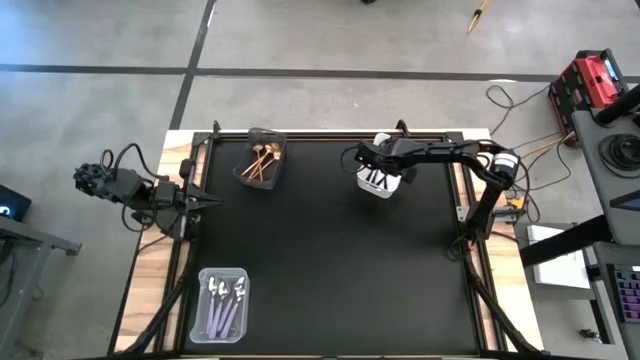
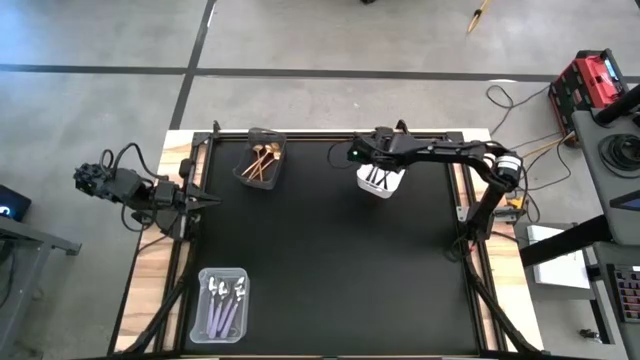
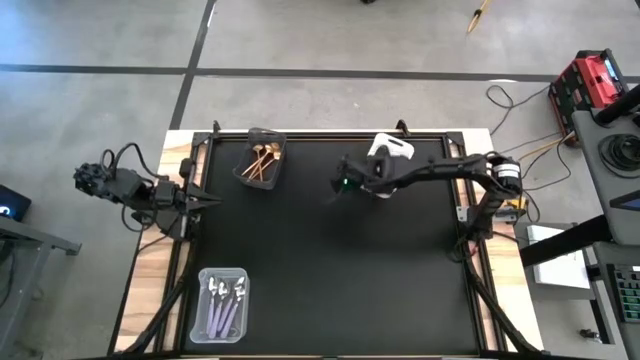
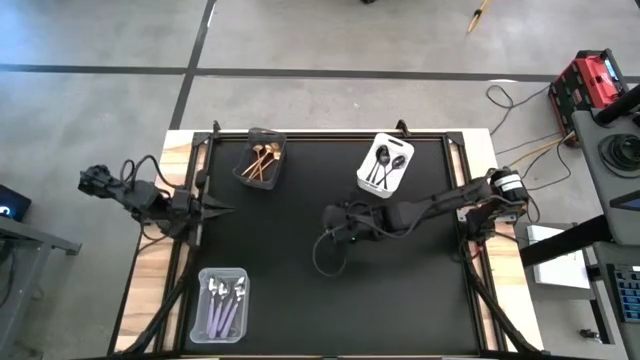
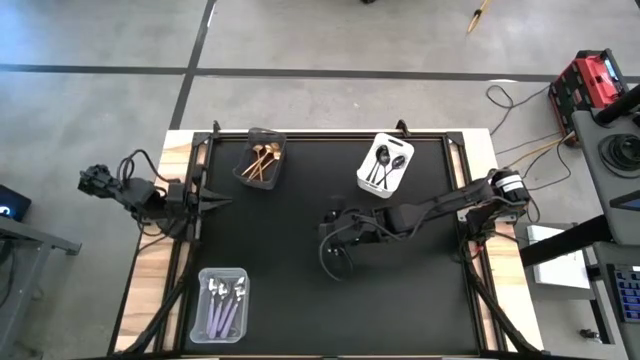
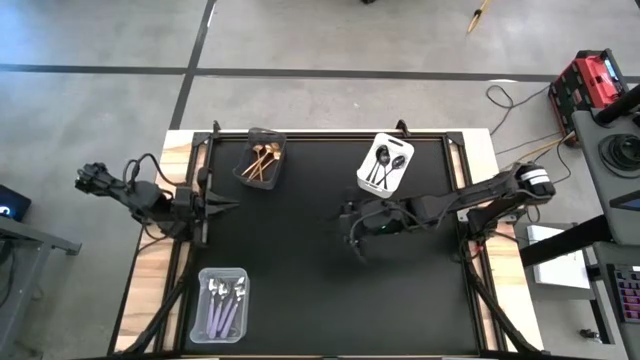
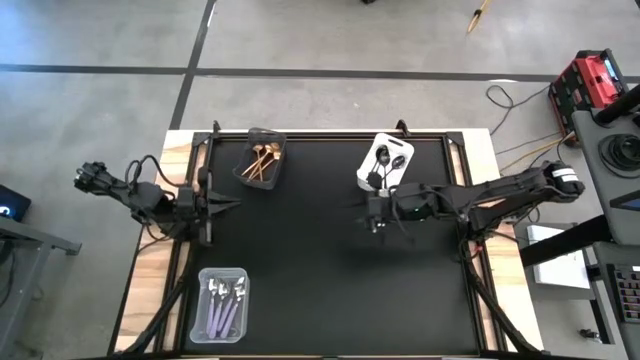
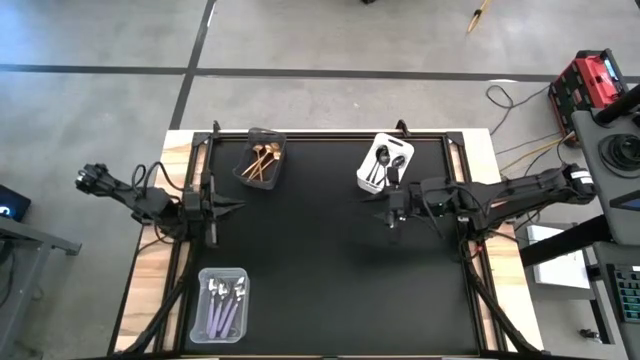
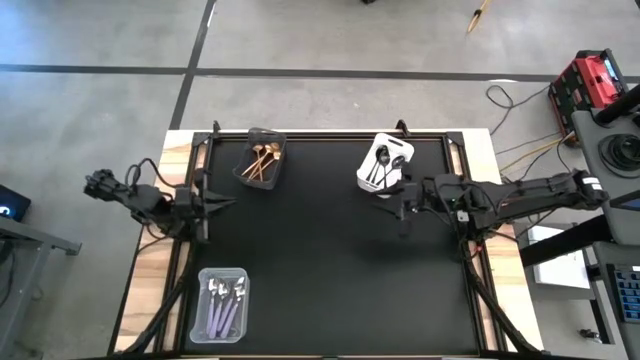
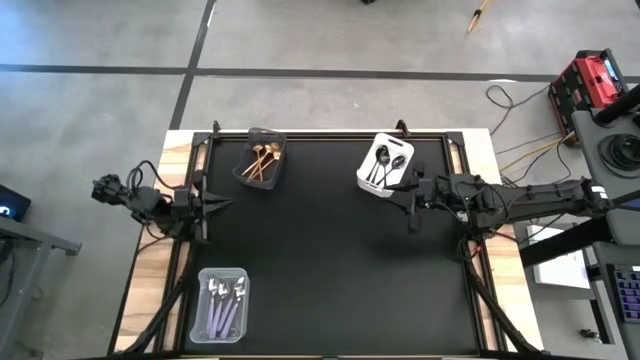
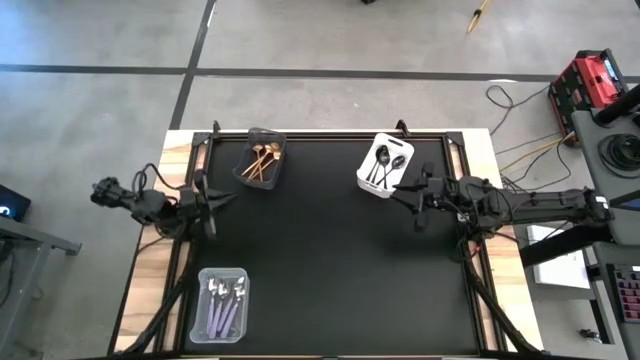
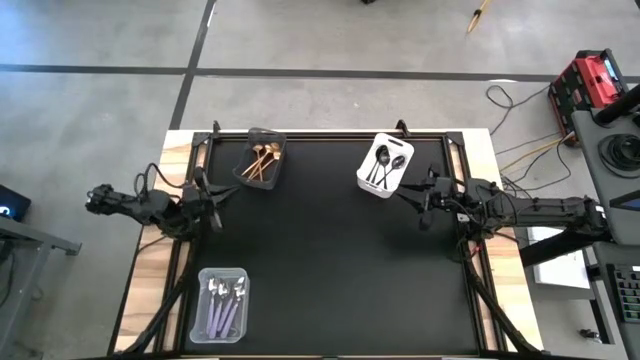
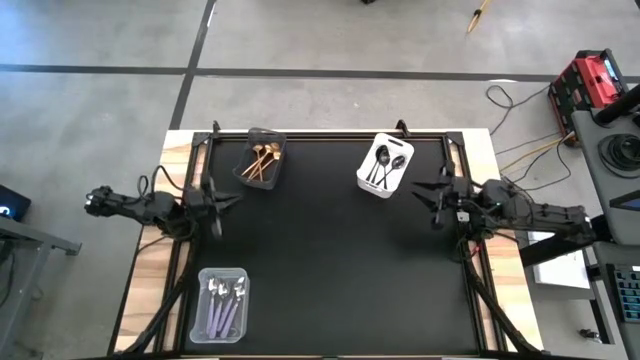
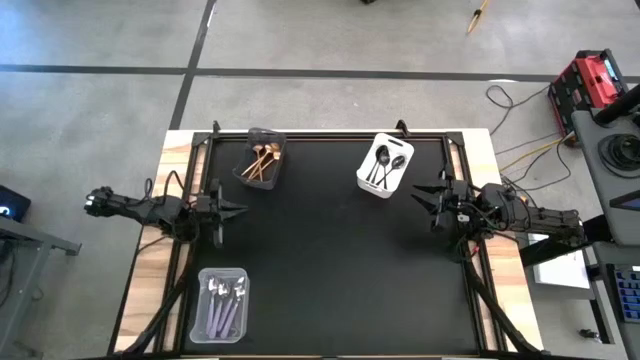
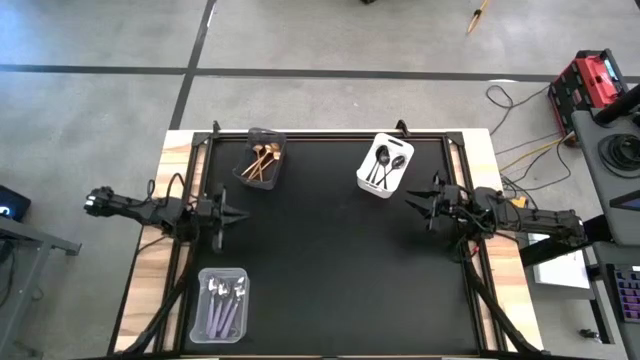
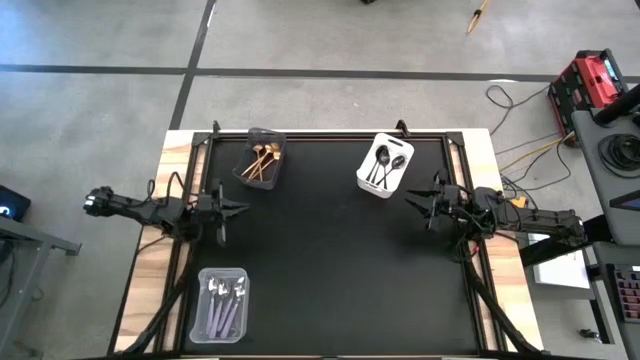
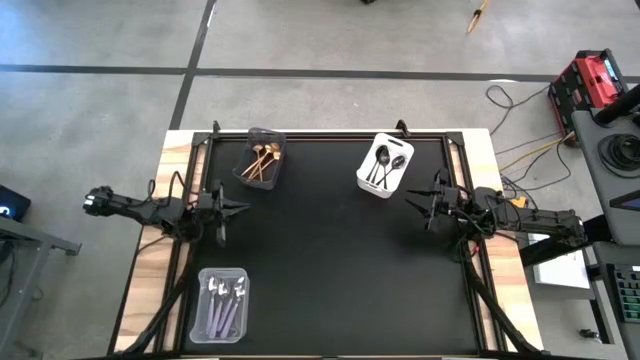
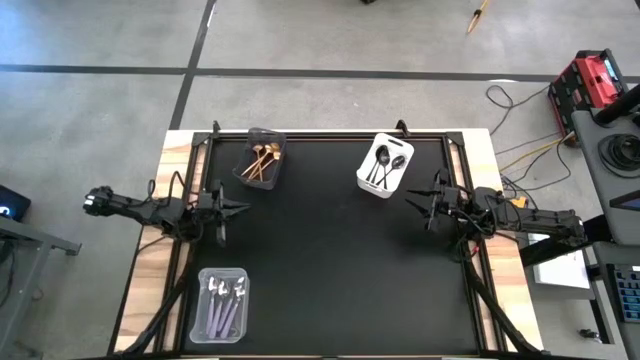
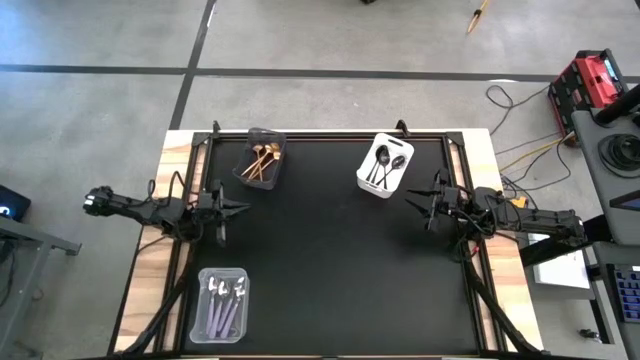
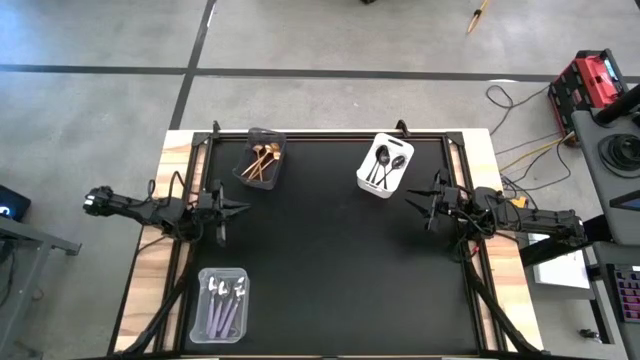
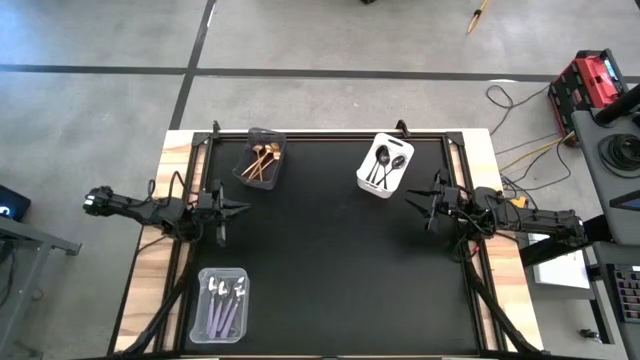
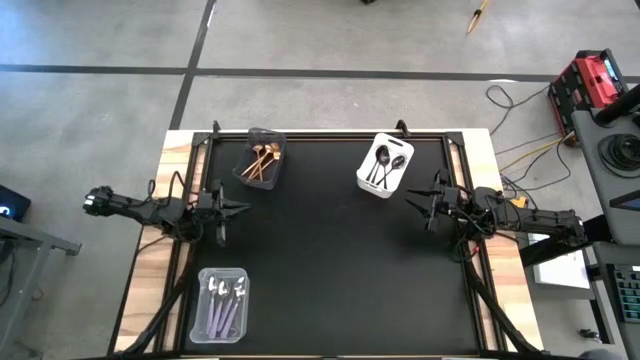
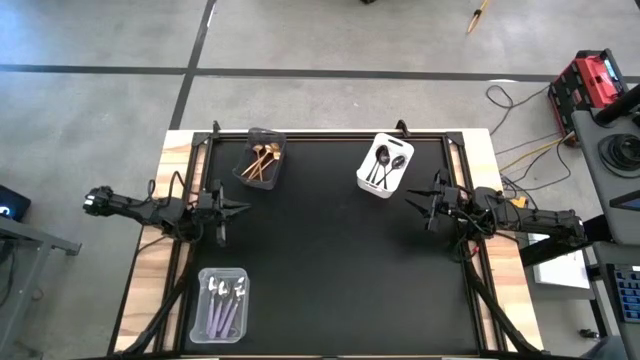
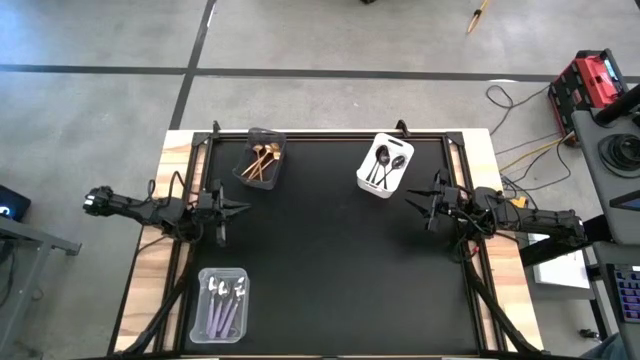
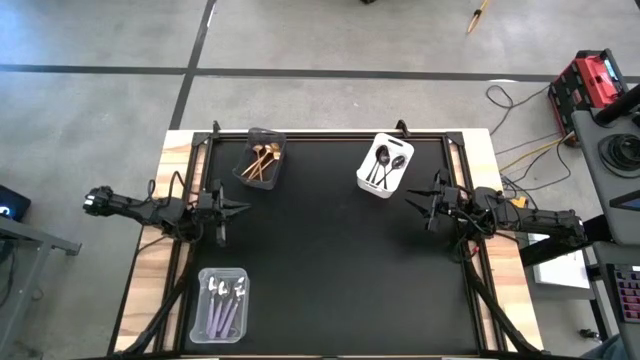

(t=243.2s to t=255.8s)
Task: Sort silverware by color (type)
Return to Home Position

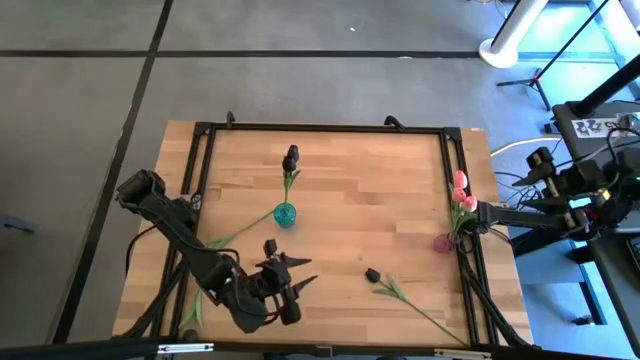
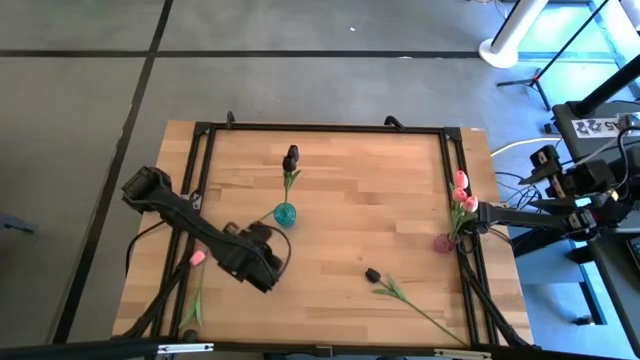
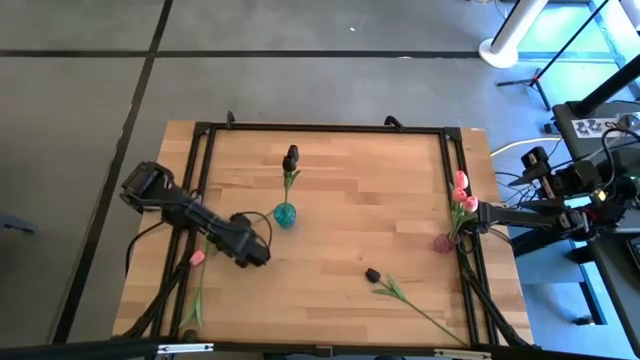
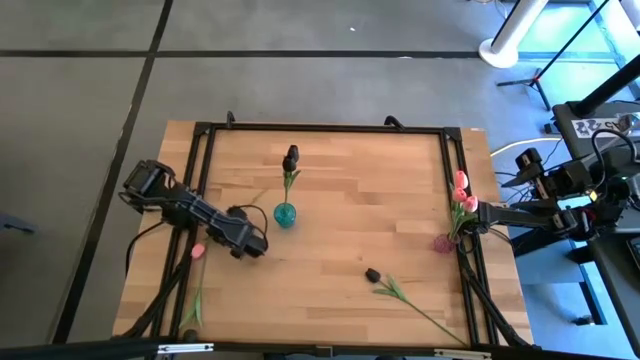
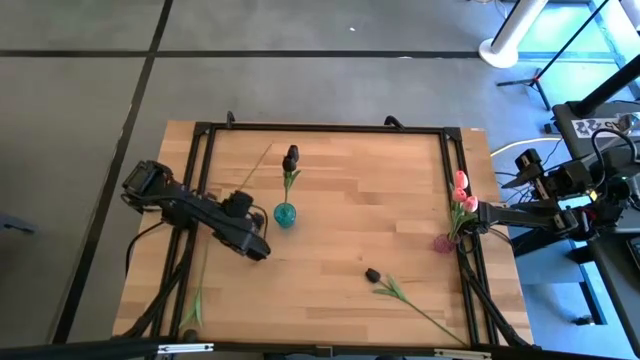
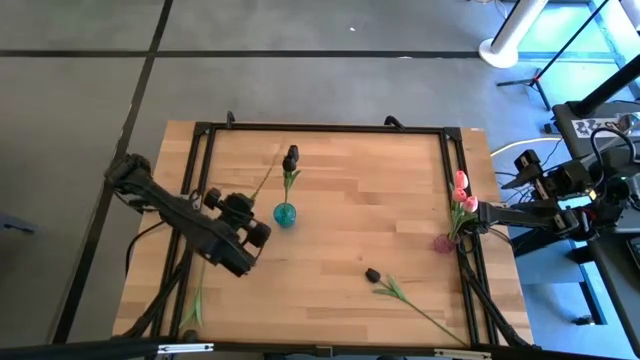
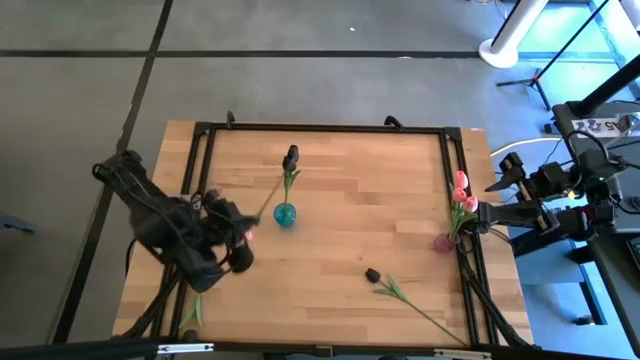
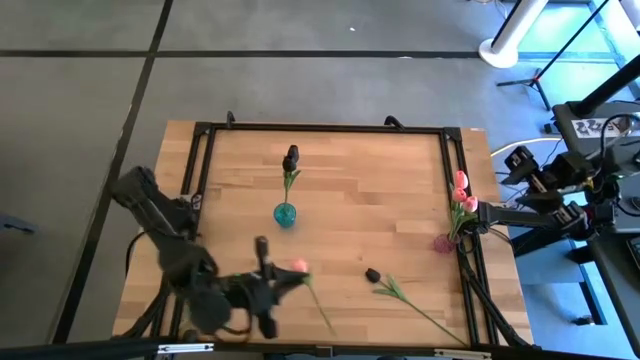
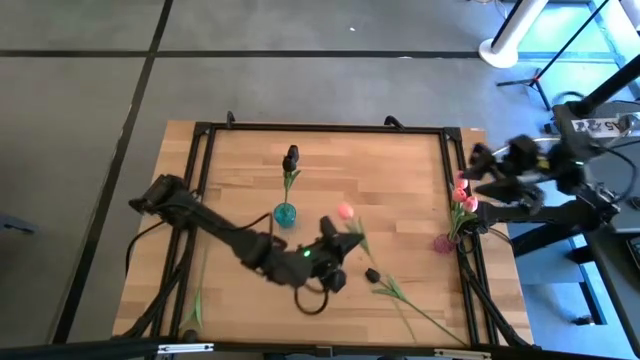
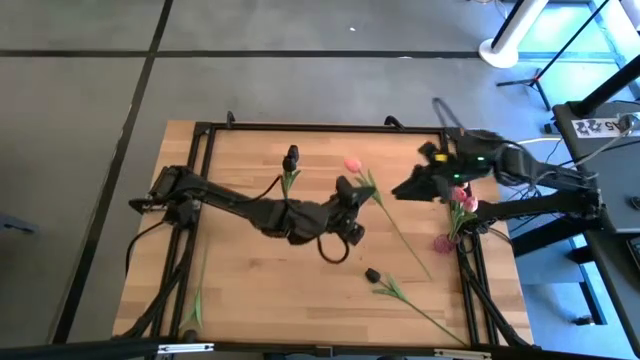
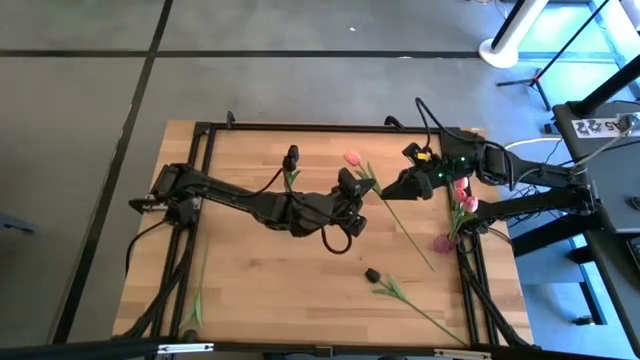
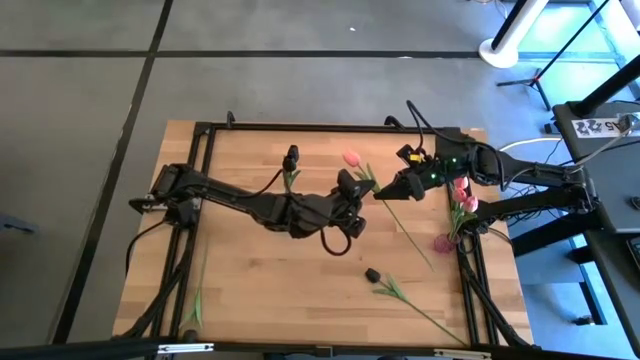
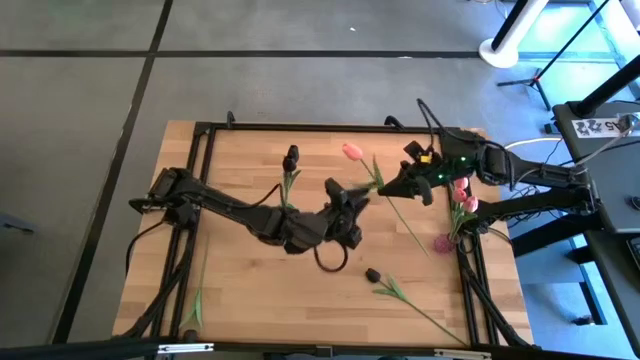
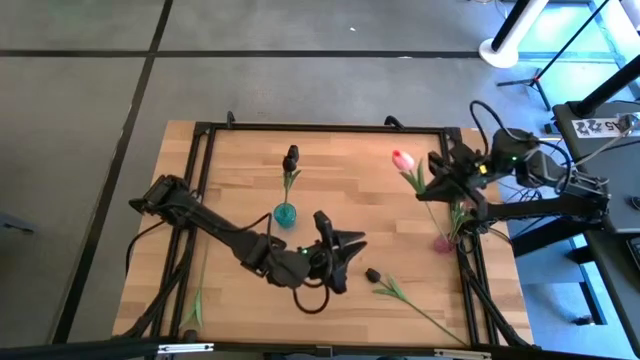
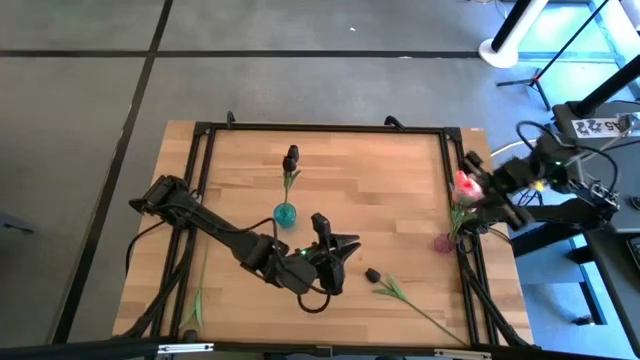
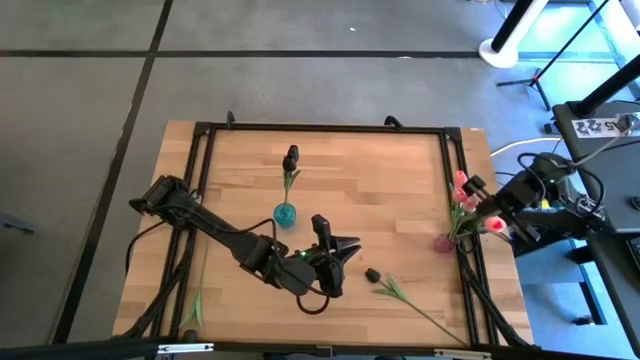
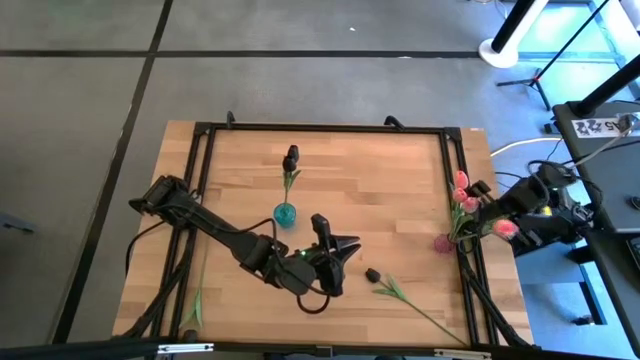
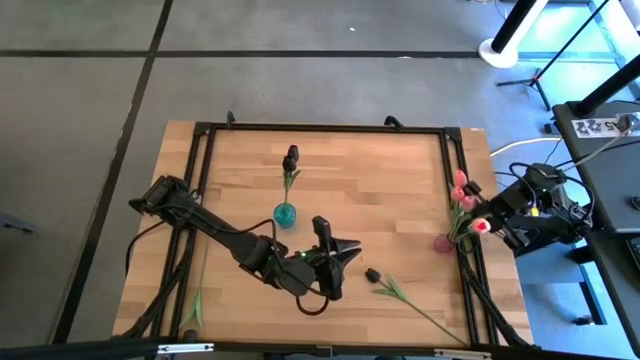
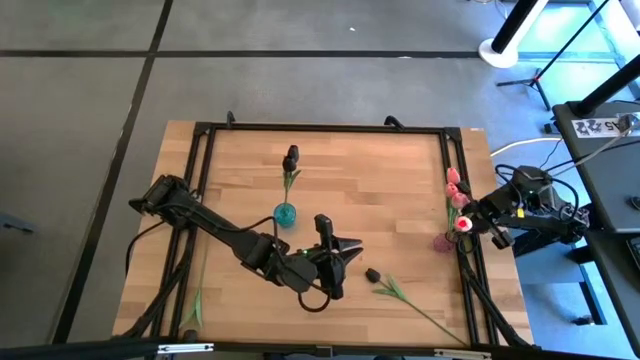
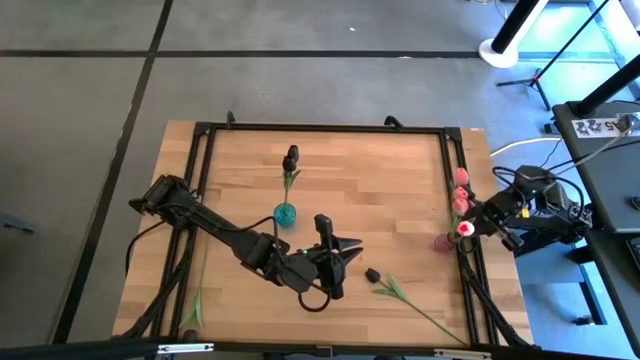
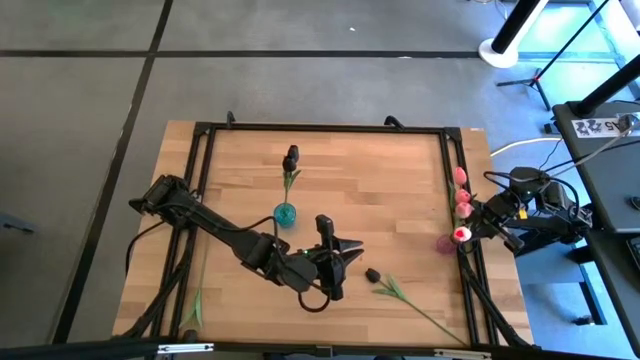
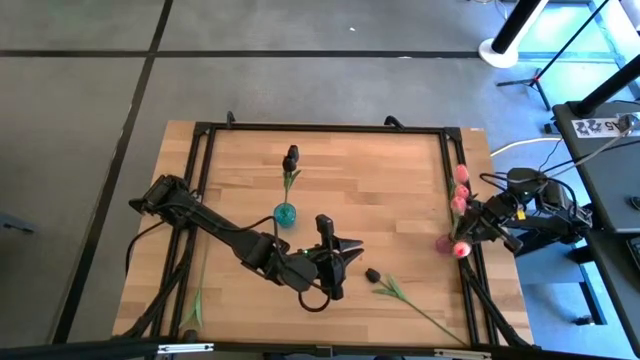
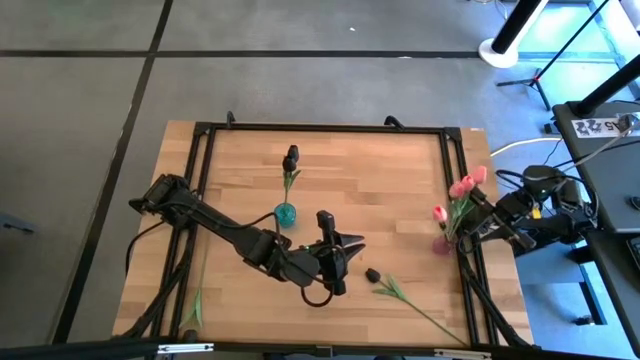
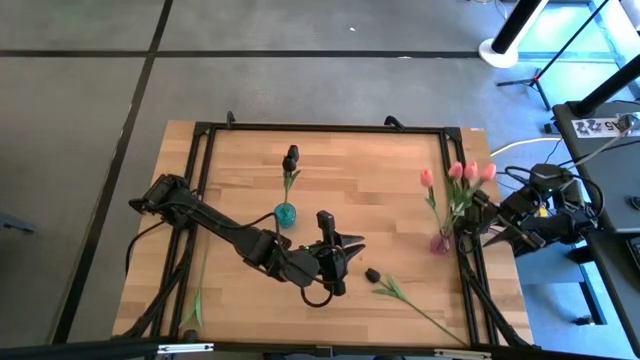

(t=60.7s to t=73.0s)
Task: Sort flowers into vase by color
Put the pink tulip into the purple vase
